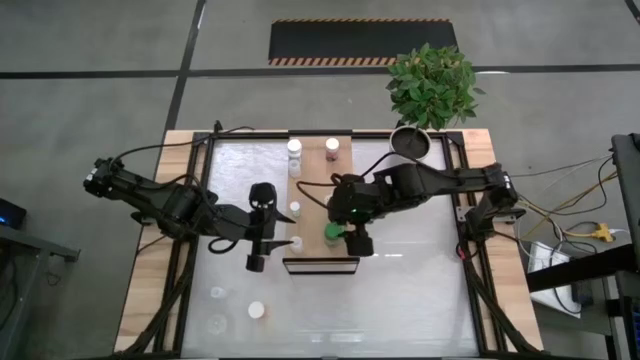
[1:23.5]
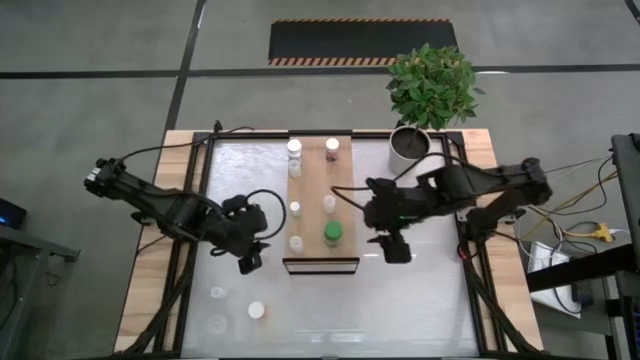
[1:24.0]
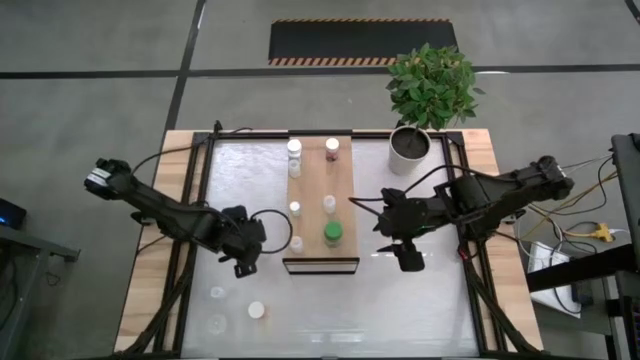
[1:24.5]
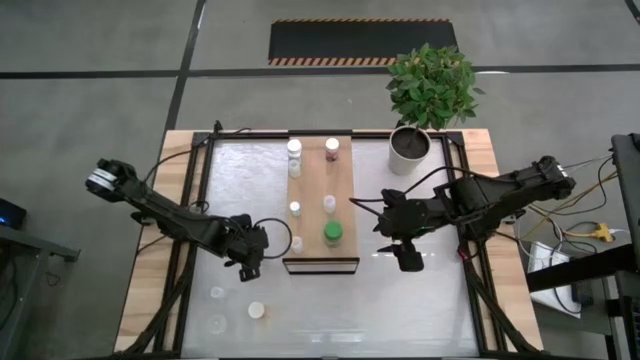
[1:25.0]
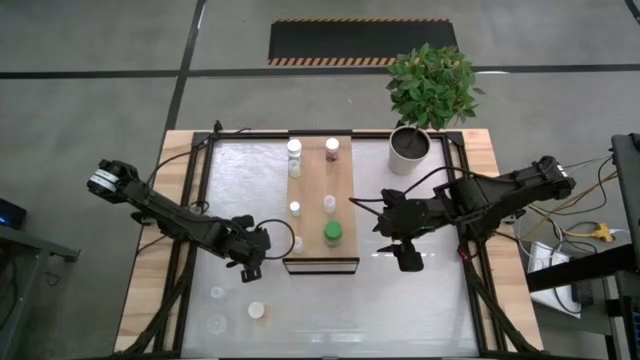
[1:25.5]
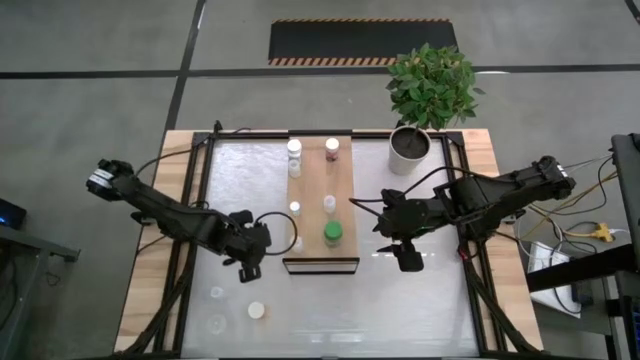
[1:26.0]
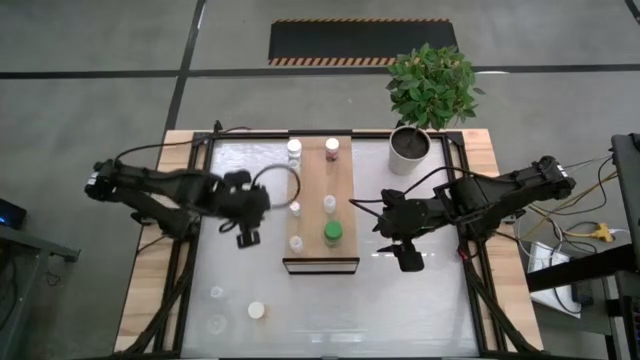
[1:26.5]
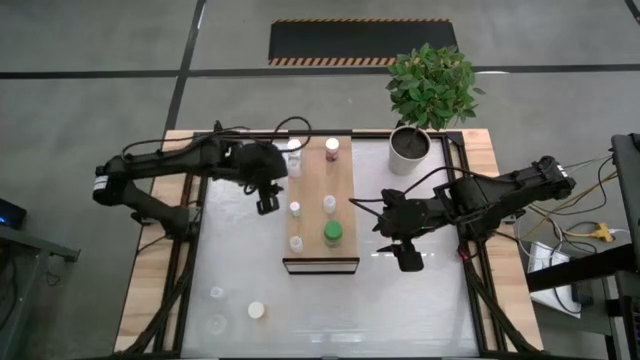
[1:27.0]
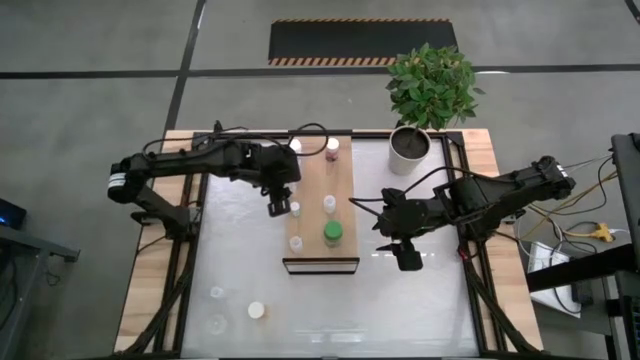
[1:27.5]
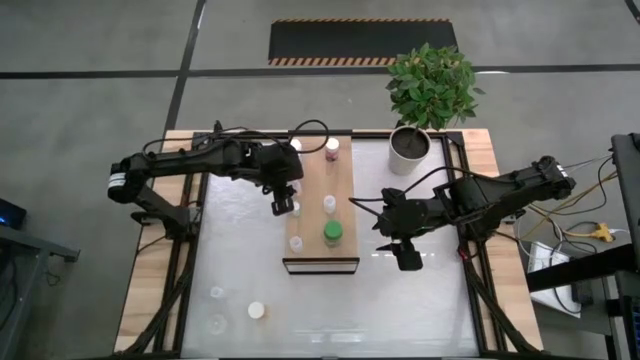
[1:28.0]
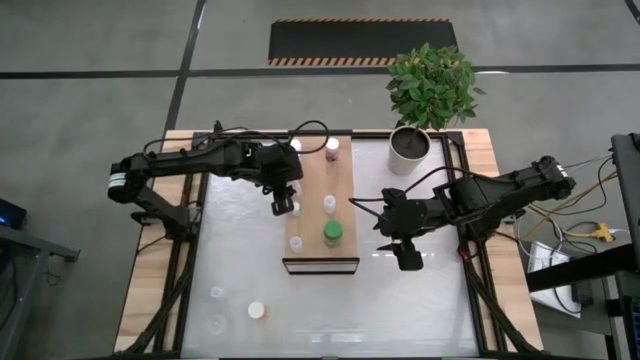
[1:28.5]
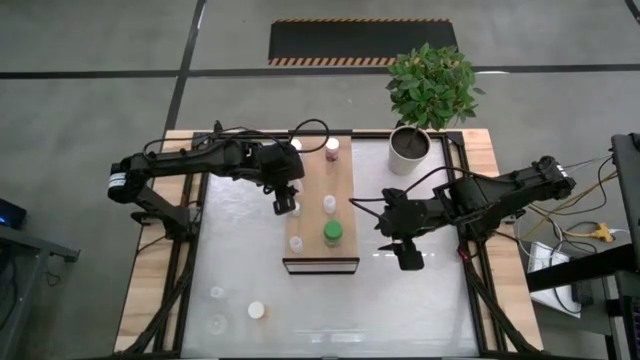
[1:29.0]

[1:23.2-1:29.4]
Task: Pick and place medicine bottles onto shelf by color
Put the transparent pill bottle on the shelf

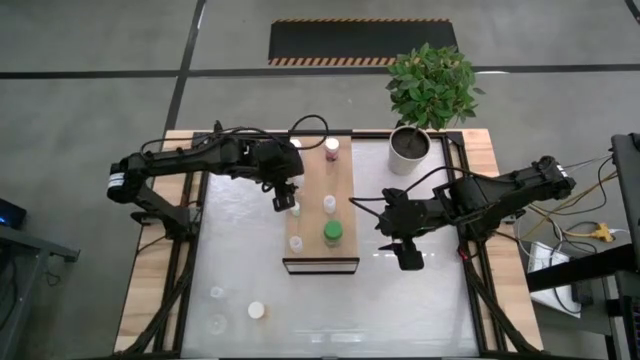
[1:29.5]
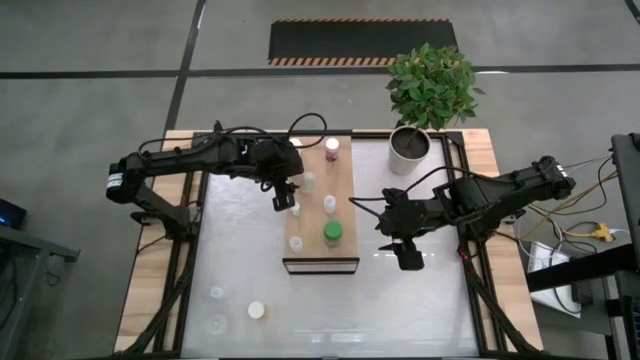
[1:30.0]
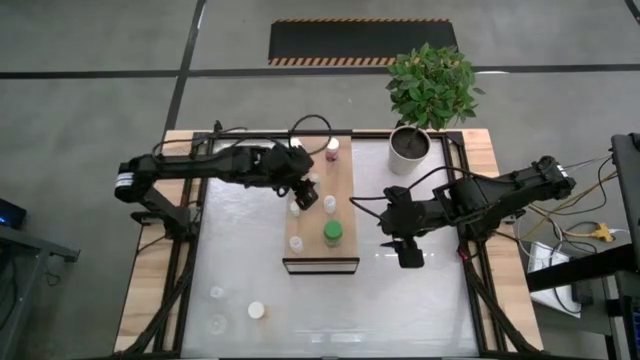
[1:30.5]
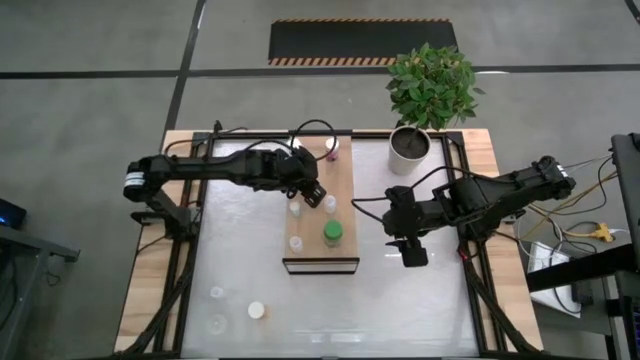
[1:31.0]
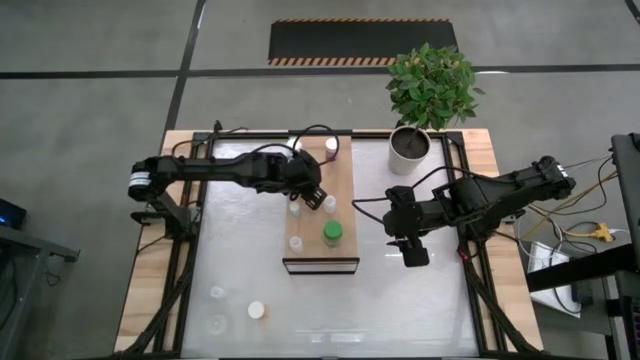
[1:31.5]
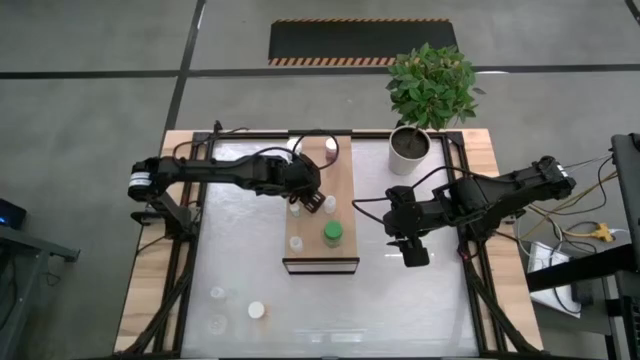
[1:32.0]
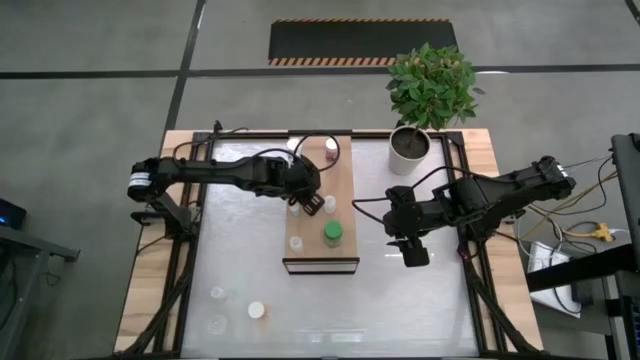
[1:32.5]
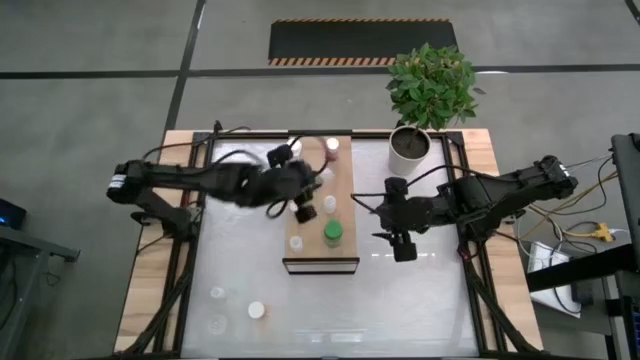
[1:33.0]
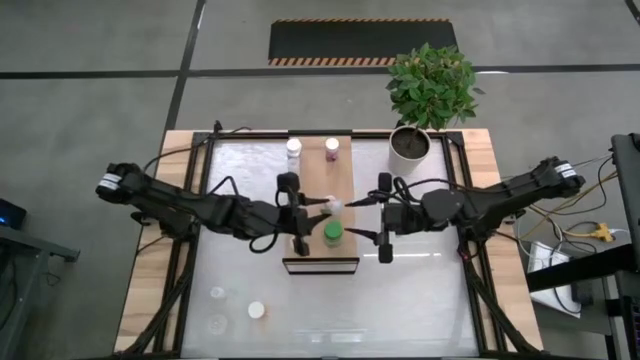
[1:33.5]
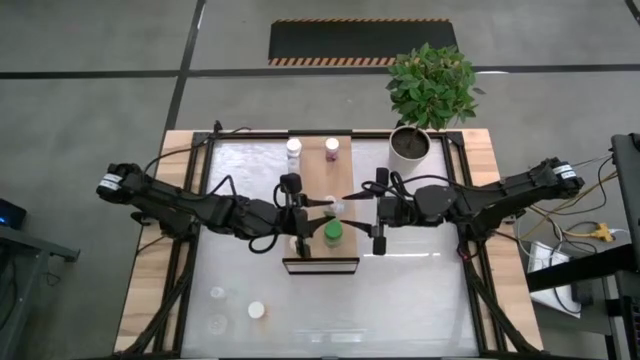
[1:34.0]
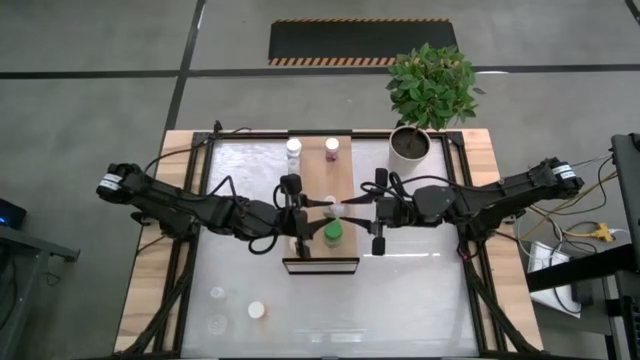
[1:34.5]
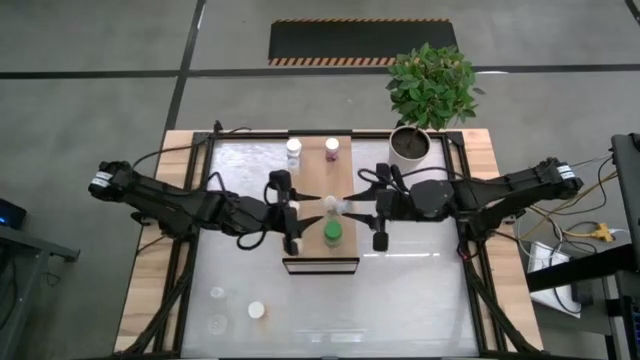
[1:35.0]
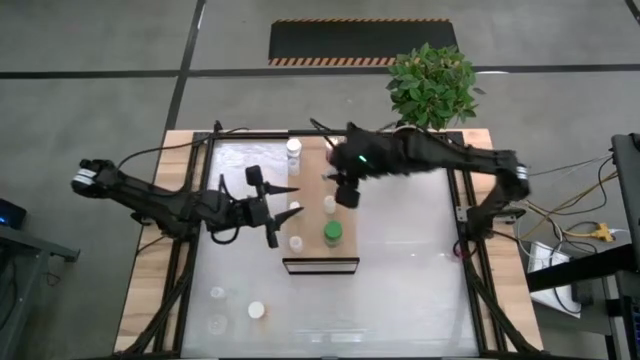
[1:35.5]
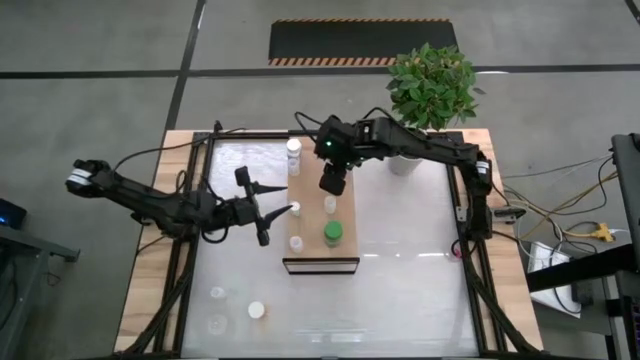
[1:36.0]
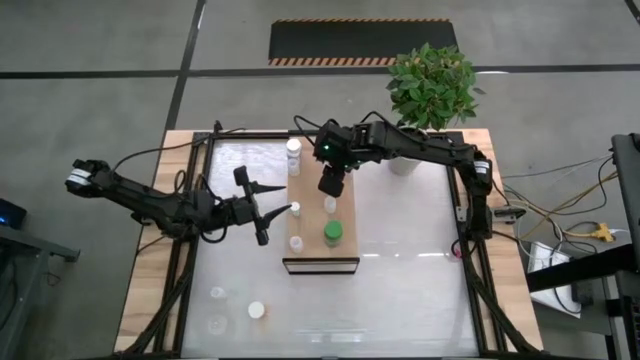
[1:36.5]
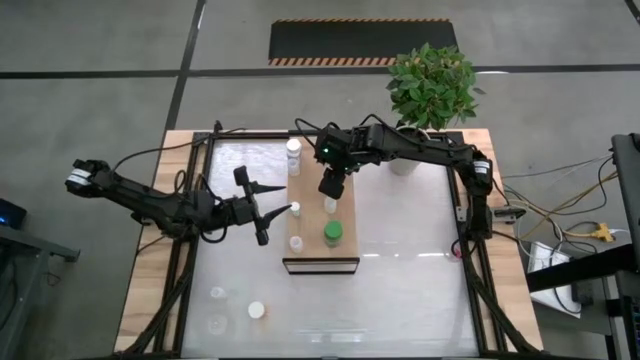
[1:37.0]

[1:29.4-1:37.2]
Put the transparent pill bottle on the shelf

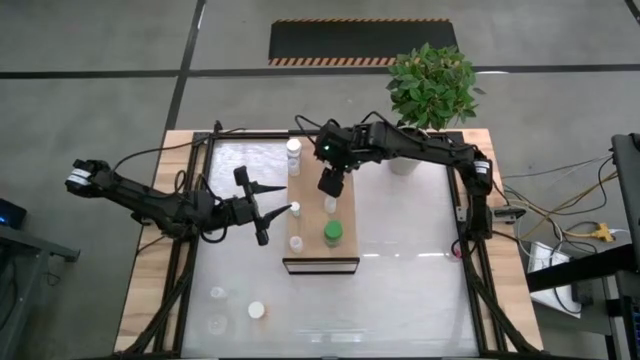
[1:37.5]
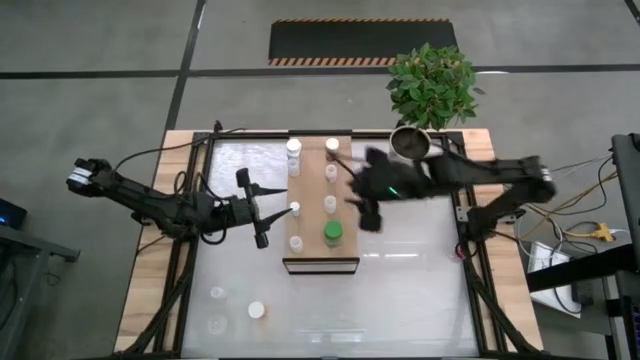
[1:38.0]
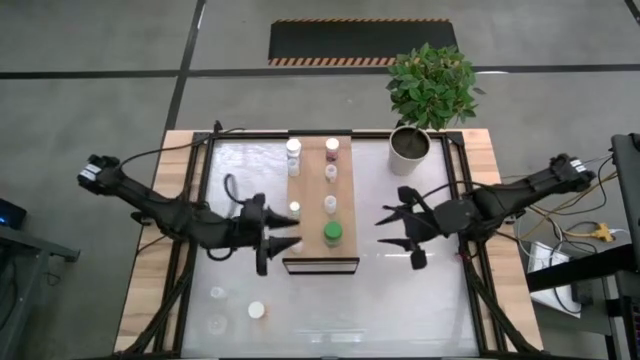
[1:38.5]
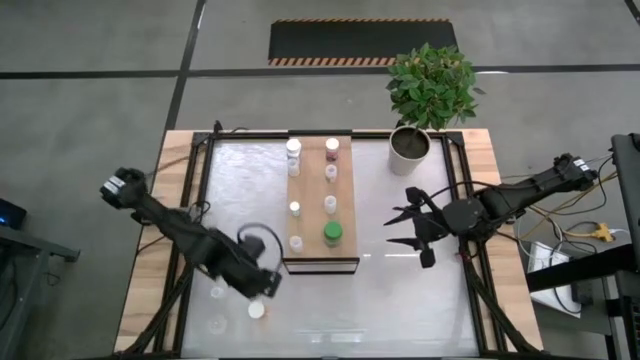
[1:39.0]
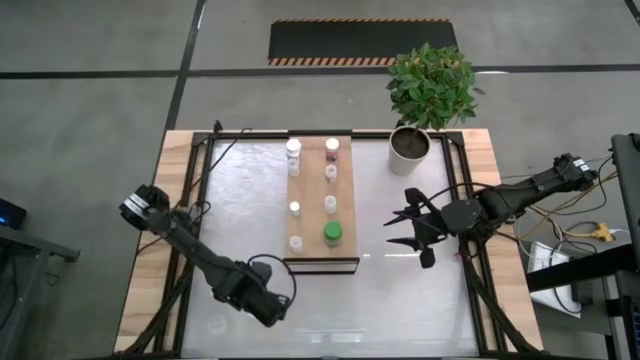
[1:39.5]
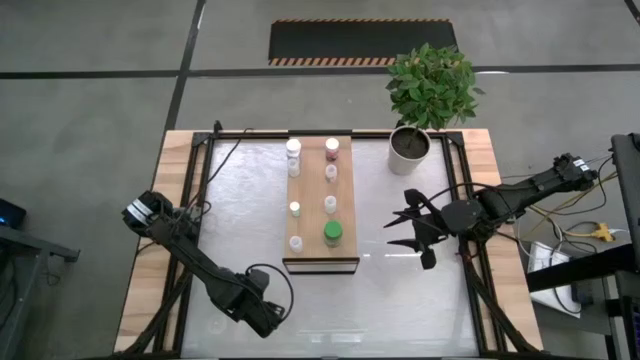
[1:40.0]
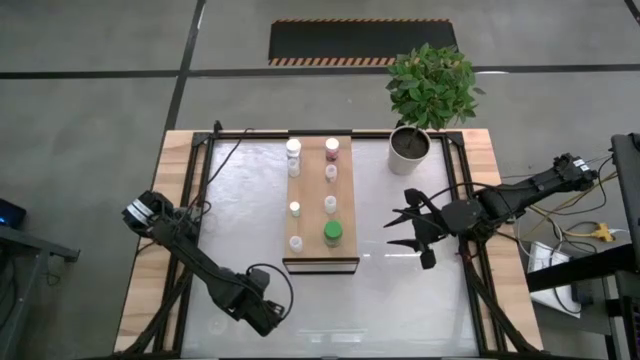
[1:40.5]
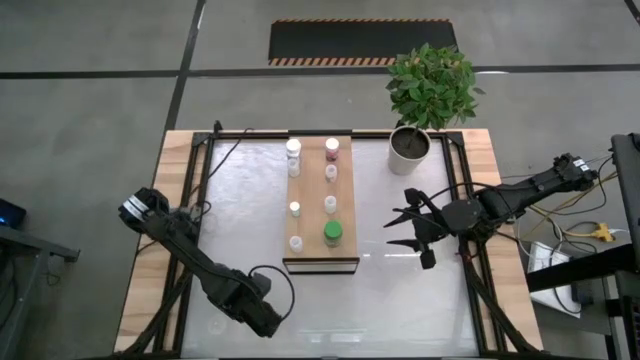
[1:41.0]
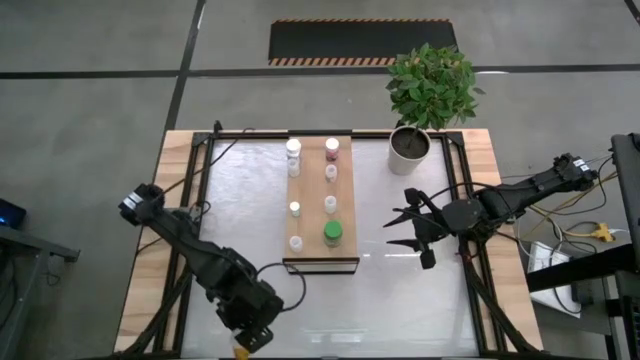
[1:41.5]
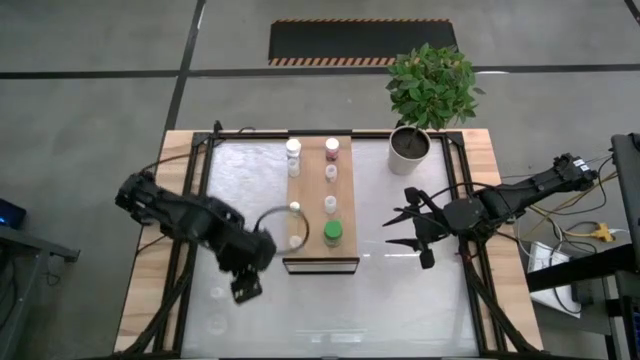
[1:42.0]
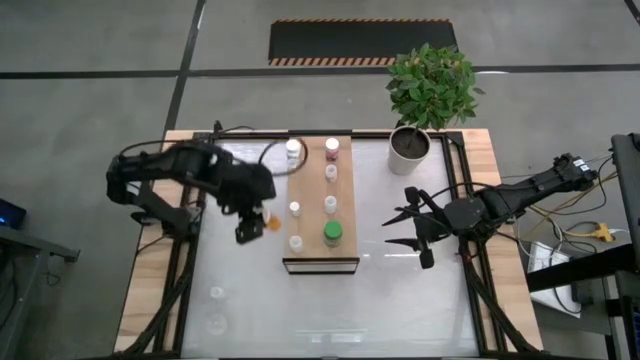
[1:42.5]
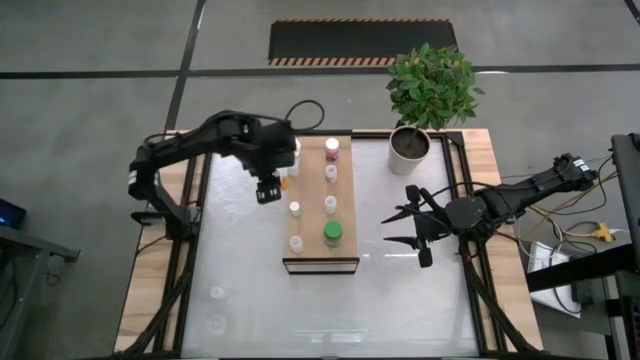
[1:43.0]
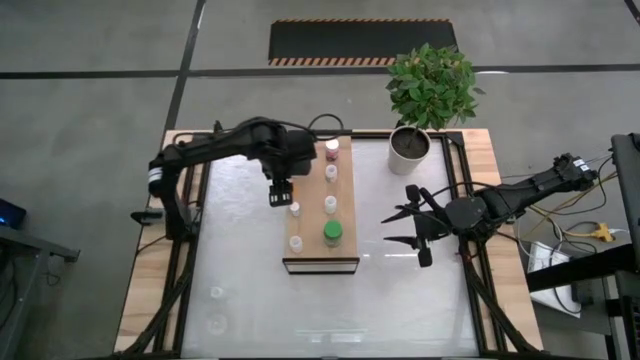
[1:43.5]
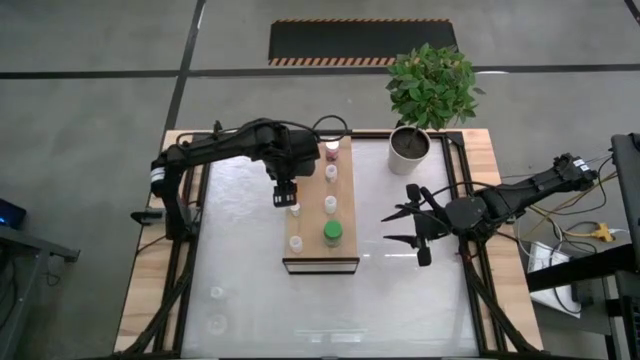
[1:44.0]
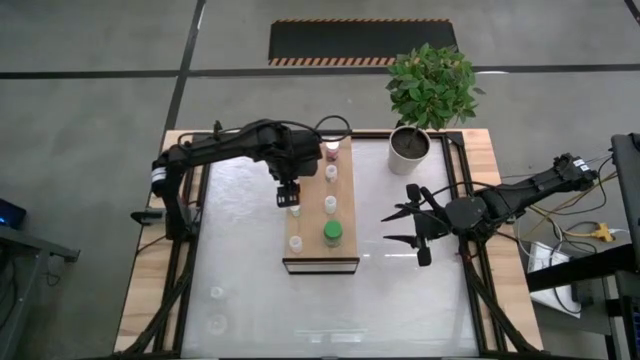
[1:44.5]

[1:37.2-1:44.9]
Put the orange pill bottle on the shelf
